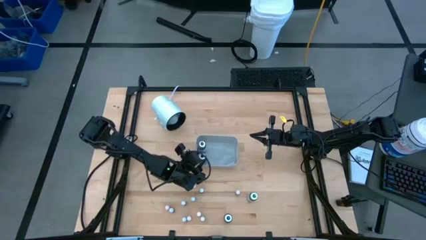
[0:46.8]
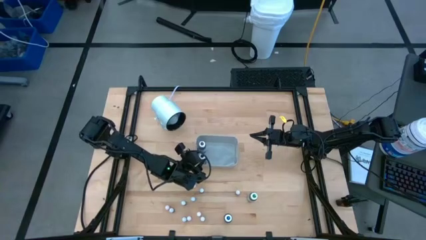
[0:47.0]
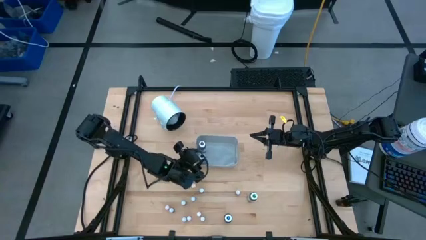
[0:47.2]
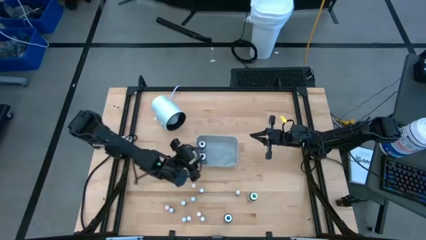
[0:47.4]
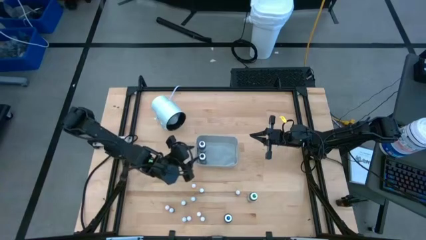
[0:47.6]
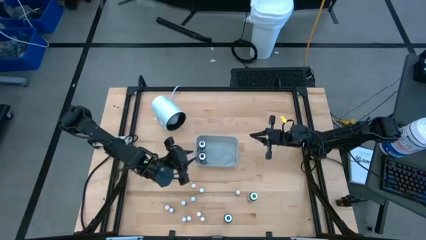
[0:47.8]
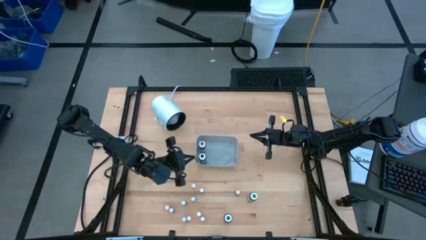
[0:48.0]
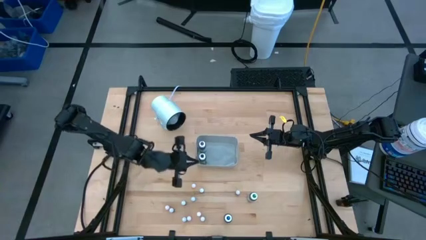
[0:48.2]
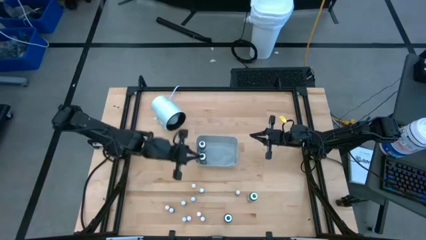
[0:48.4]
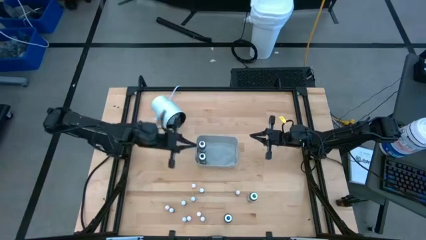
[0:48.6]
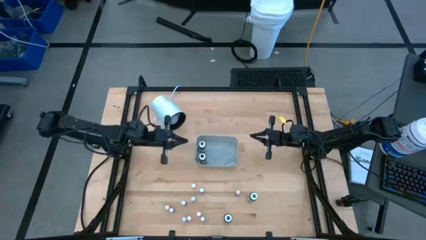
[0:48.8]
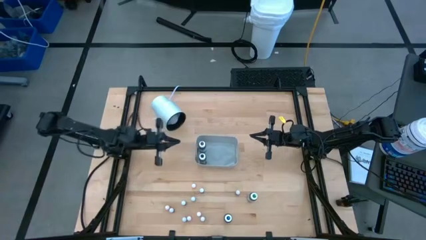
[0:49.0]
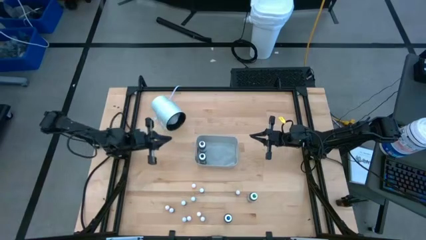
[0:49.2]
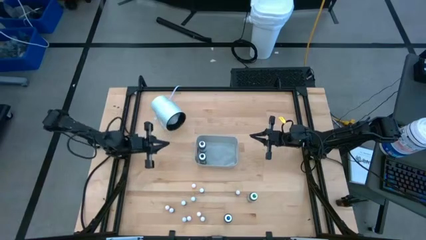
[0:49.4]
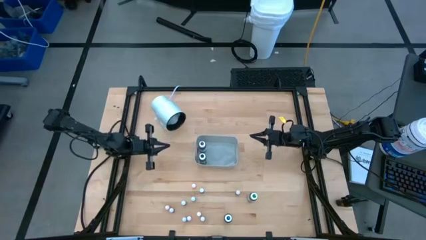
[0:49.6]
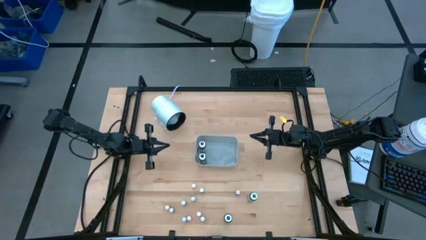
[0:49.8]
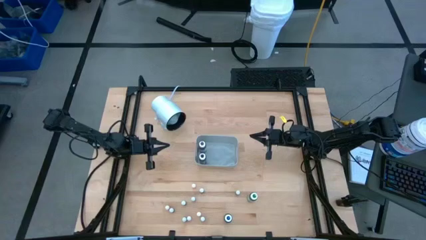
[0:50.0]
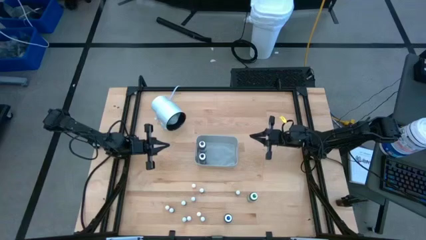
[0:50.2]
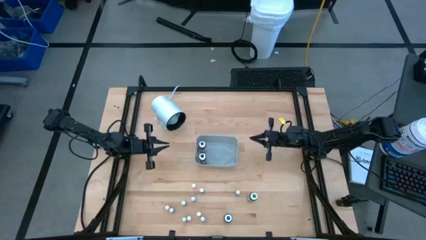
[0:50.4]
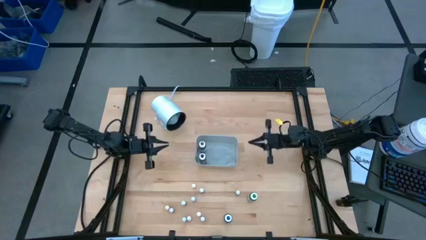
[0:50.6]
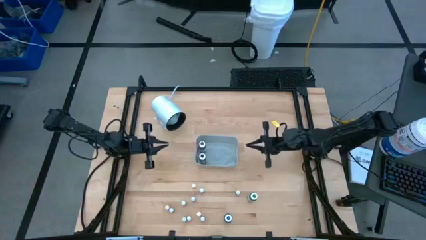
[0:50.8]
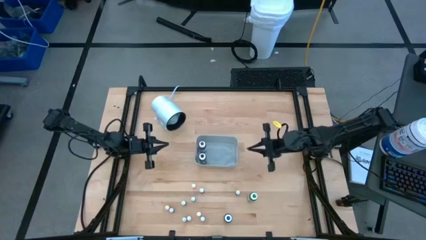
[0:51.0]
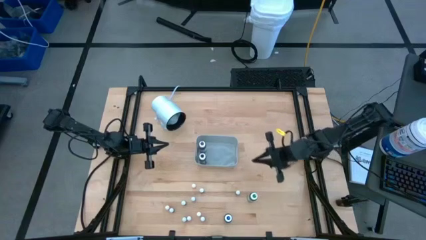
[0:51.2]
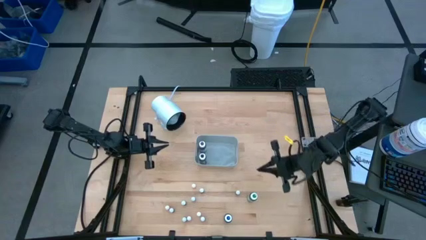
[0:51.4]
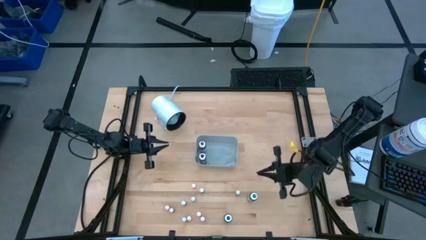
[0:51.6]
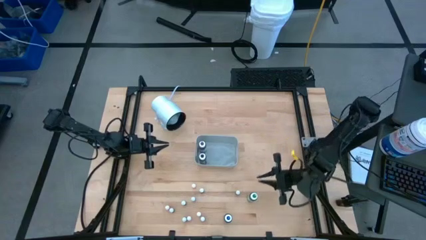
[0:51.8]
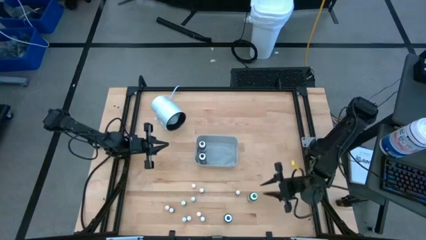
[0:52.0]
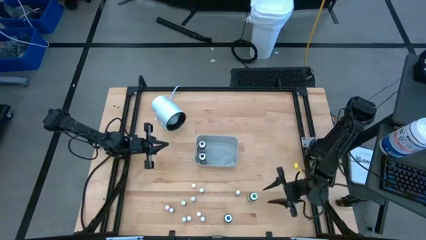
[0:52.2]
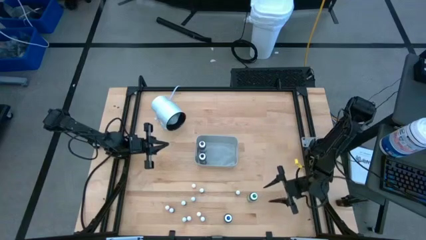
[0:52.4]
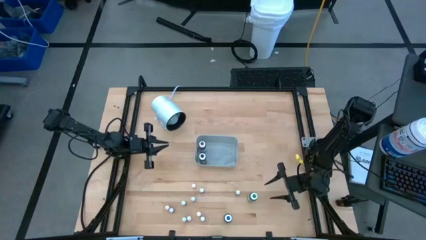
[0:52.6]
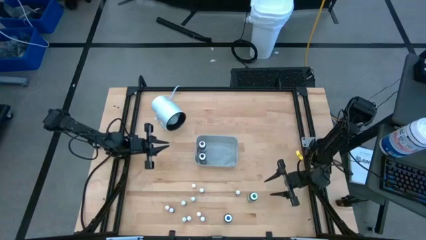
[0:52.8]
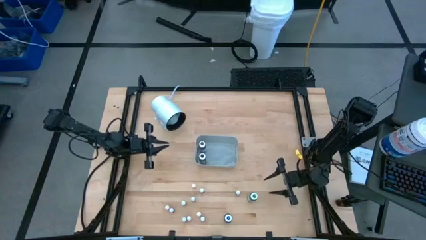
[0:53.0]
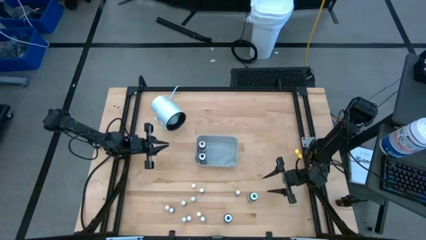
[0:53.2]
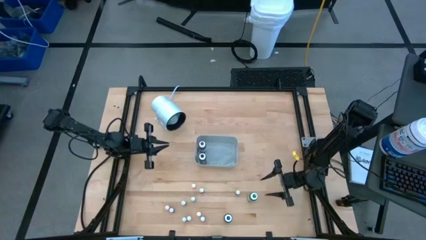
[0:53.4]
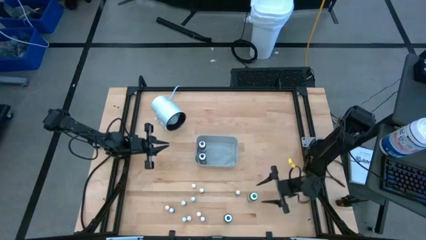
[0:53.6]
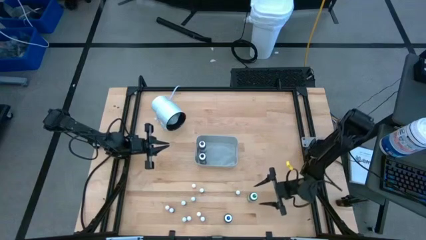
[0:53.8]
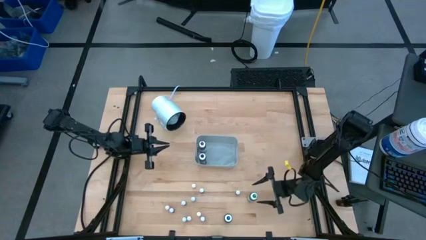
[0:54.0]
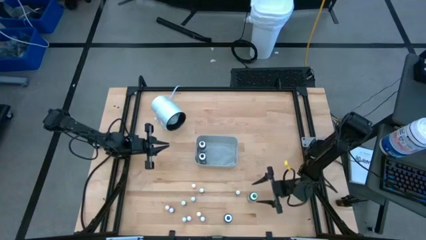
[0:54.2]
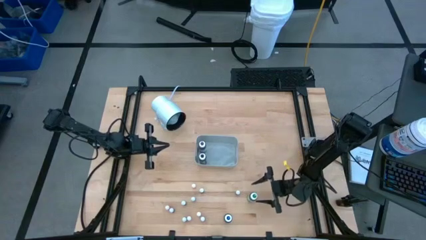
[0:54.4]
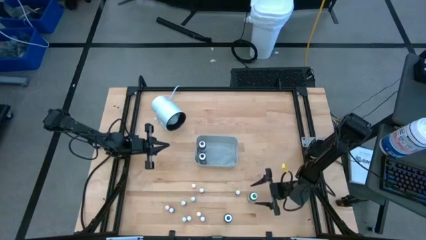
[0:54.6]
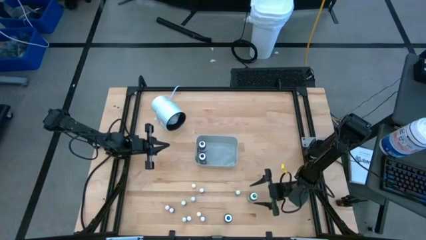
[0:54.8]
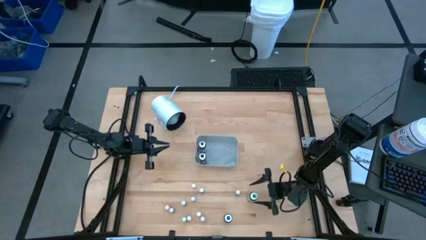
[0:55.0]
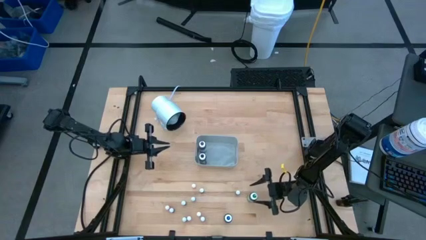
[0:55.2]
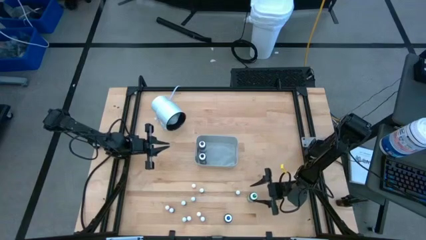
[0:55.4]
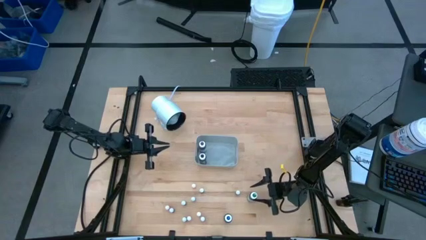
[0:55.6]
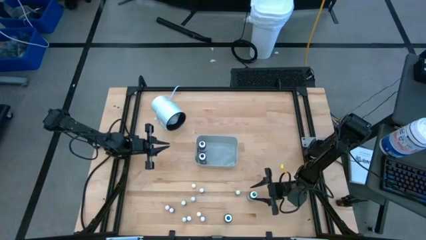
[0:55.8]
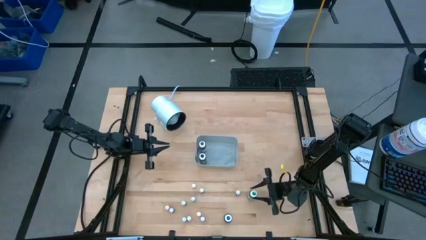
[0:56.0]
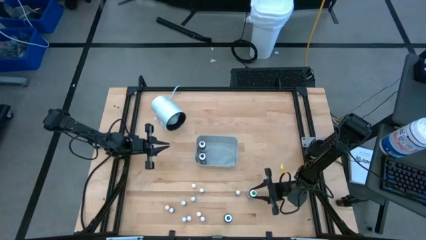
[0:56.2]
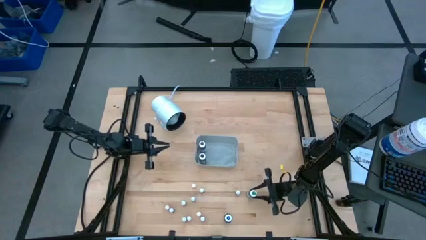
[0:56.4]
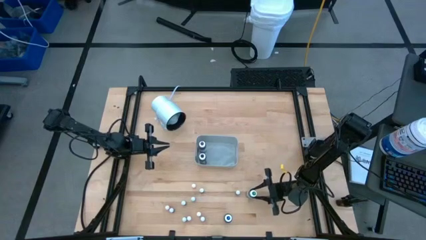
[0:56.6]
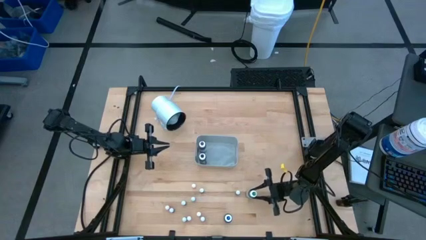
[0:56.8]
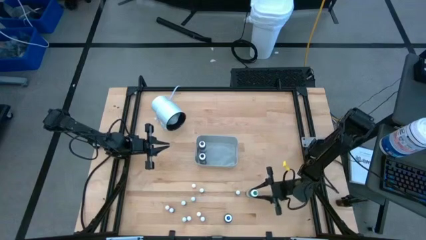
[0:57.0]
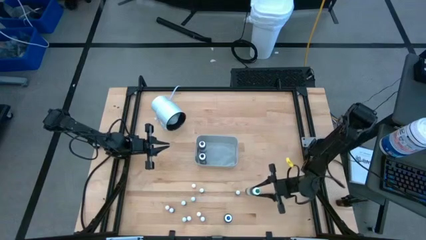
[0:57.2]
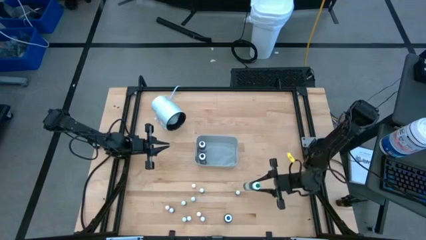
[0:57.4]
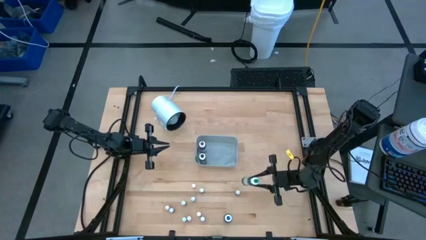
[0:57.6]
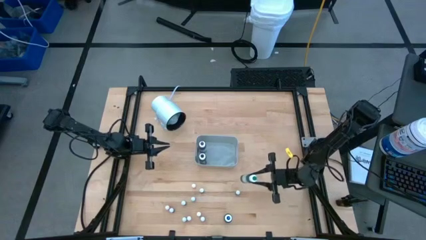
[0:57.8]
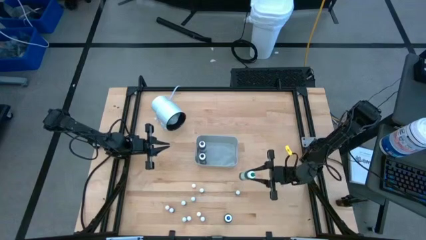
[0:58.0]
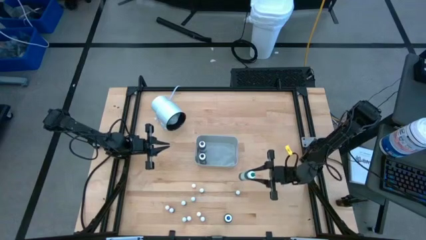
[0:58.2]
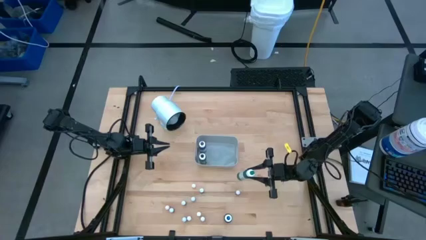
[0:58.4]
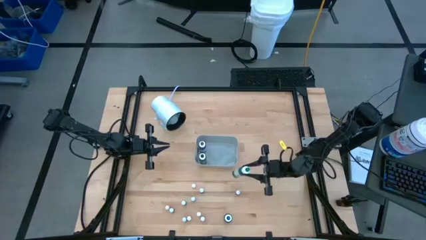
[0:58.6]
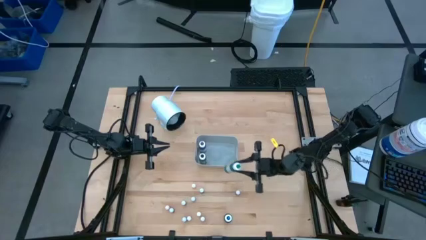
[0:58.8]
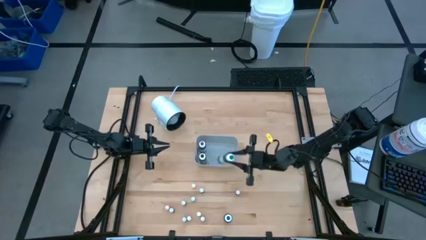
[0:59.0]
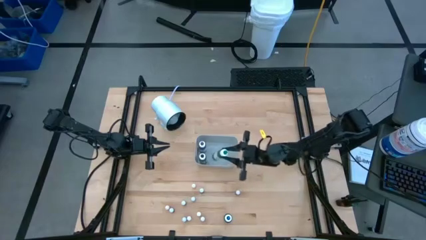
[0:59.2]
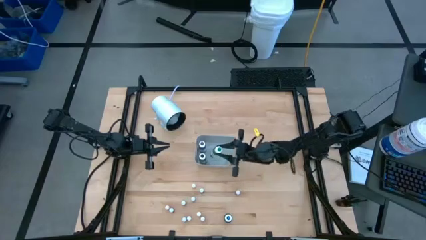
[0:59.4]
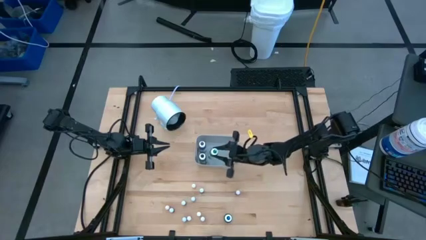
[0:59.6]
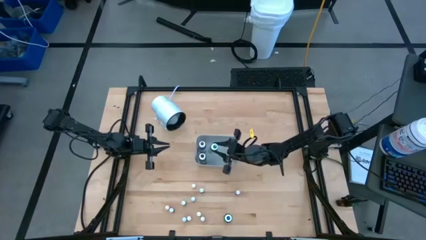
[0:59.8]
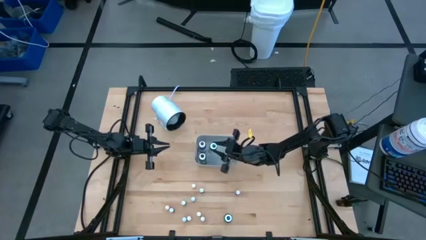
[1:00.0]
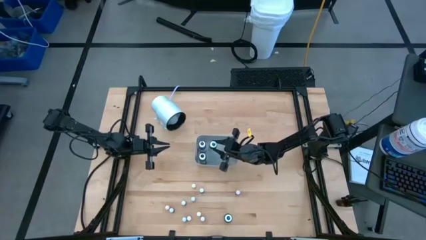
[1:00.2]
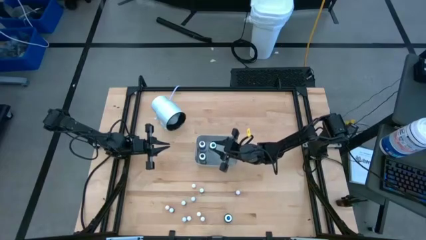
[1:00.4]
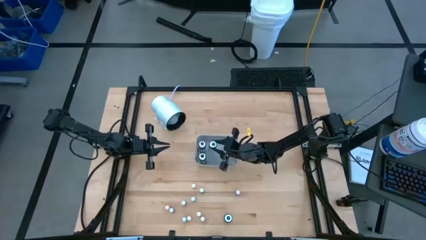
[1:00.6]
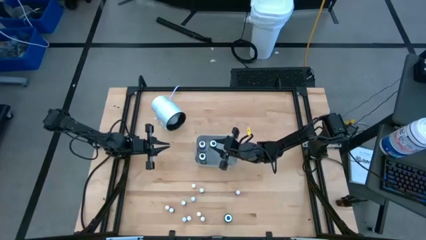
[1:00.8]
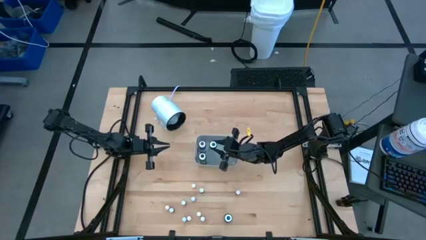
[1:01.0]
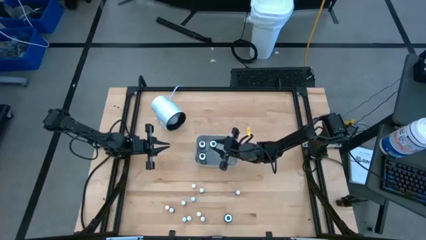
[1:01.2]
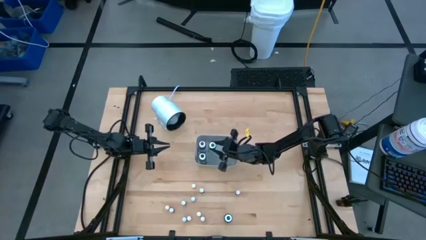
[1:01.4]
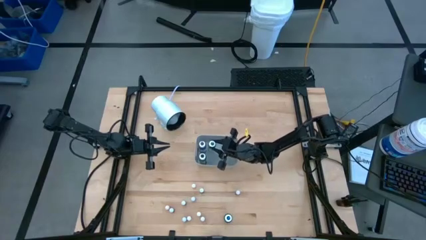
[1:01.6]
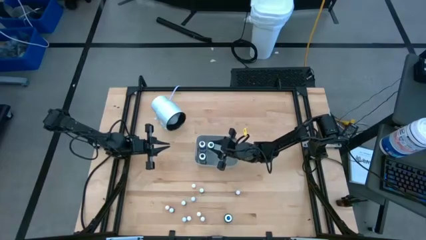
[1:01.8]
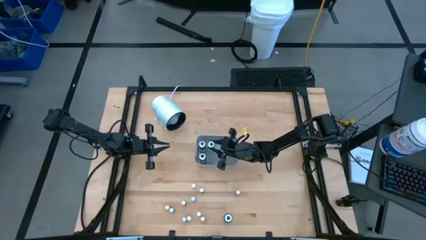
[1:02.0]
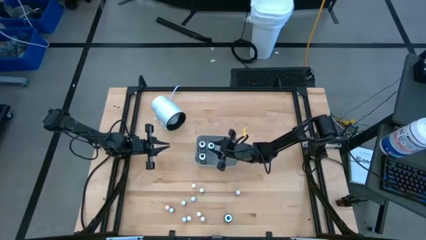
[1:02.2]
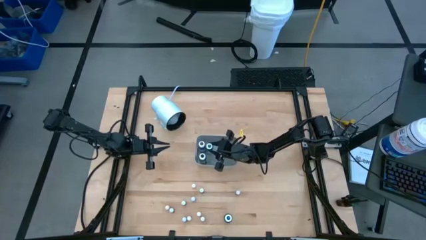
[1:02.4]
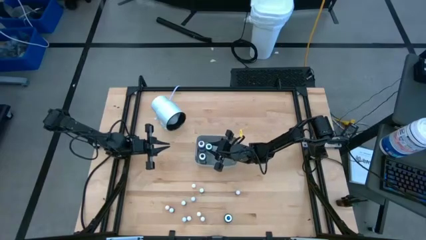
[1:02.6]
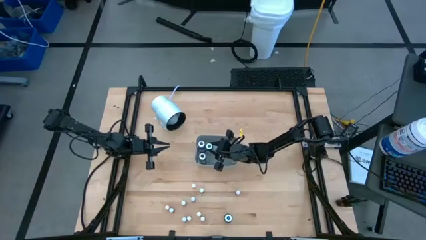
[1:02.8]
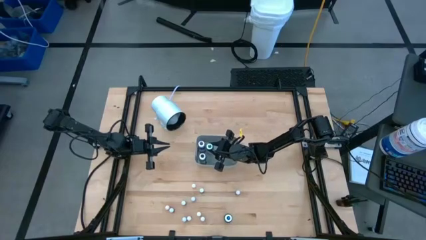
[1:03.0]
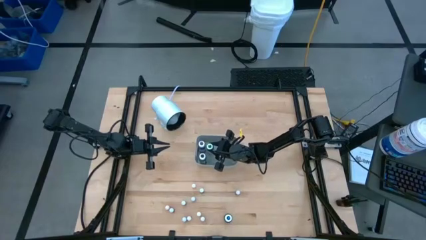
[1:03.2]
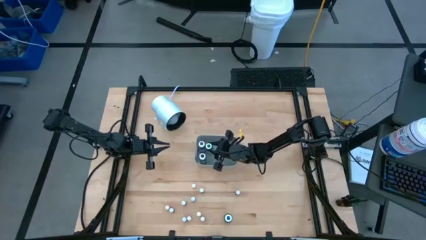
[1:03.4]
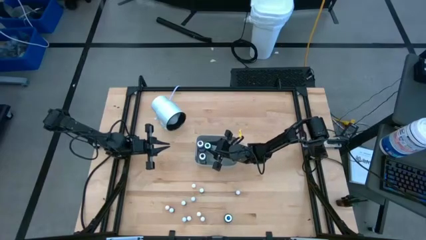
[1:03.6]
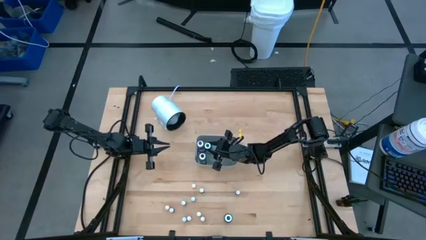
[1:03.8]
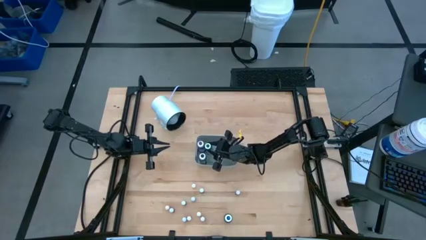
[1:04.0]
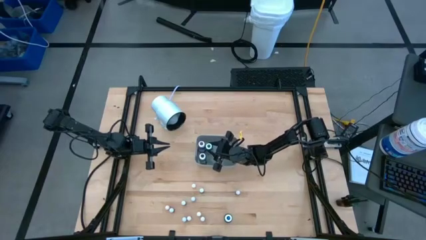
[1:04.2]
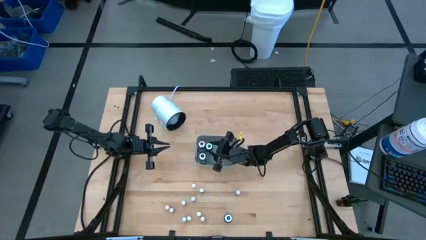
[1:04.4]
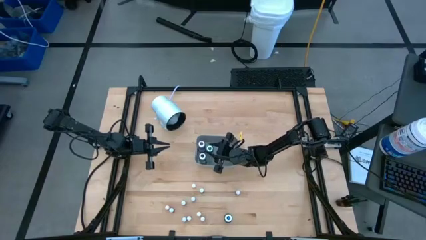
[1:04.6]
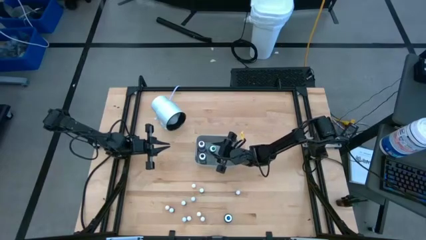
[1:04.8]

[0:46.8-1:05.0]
Task: Pick & Place food coloring
Put the big green food coloring bottle into the gray bin
